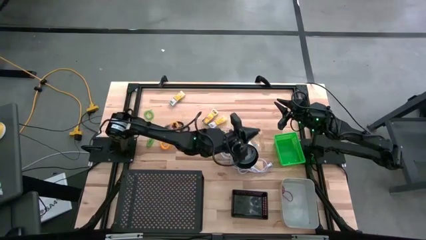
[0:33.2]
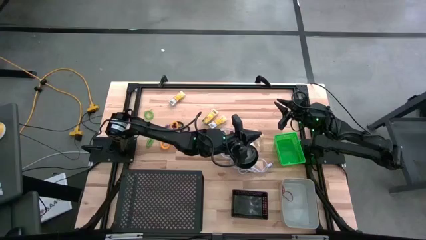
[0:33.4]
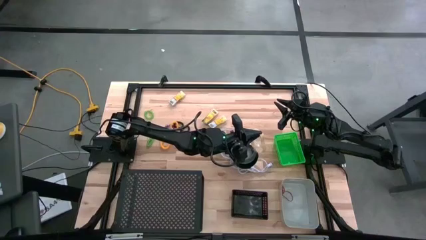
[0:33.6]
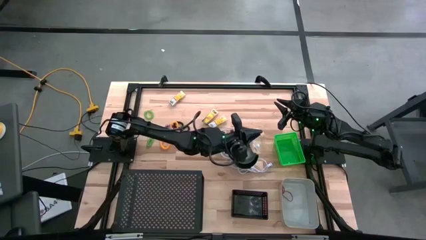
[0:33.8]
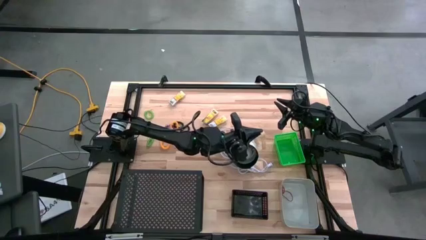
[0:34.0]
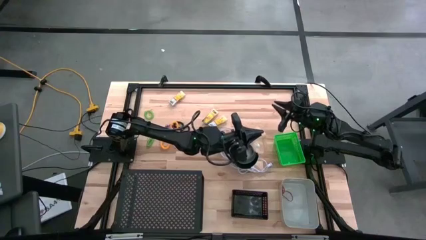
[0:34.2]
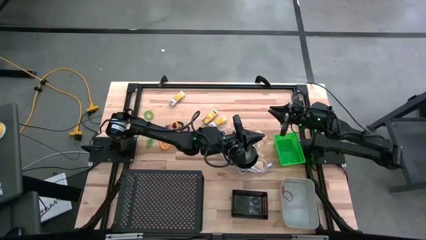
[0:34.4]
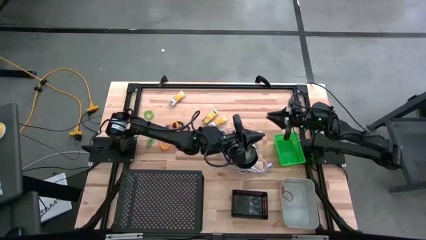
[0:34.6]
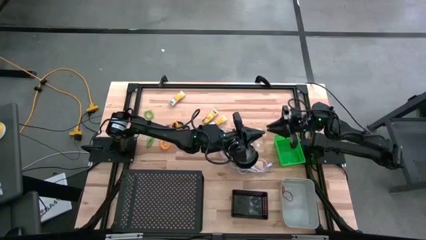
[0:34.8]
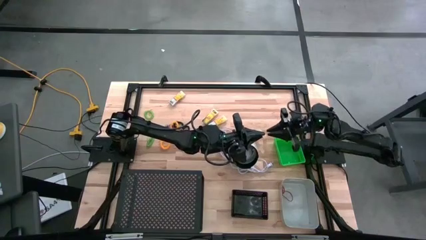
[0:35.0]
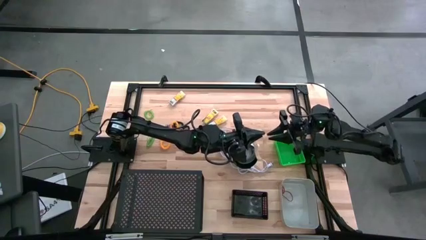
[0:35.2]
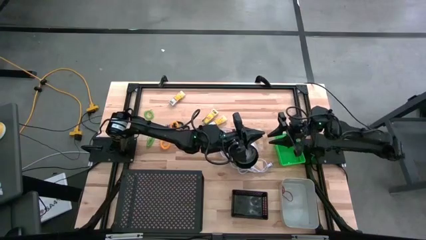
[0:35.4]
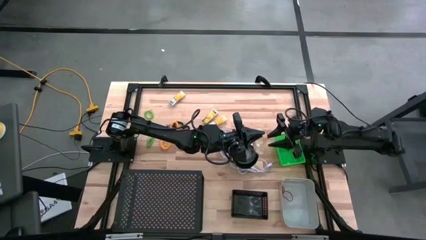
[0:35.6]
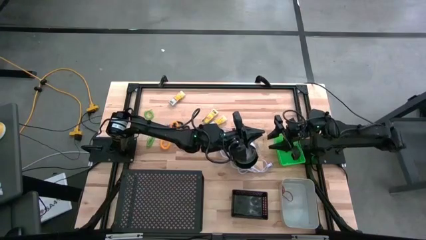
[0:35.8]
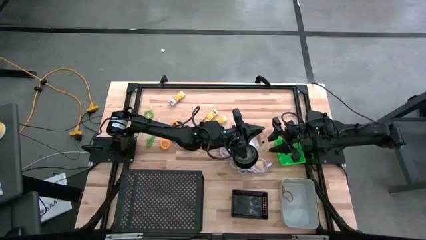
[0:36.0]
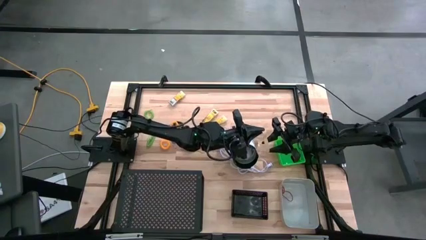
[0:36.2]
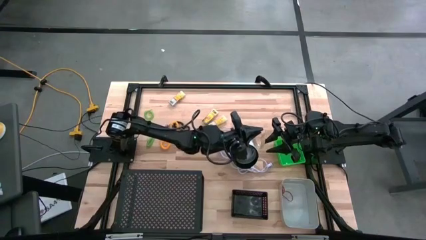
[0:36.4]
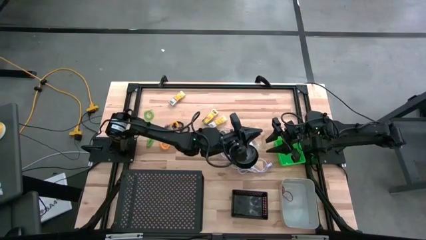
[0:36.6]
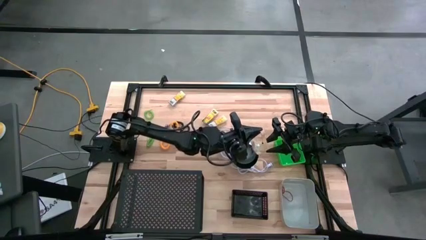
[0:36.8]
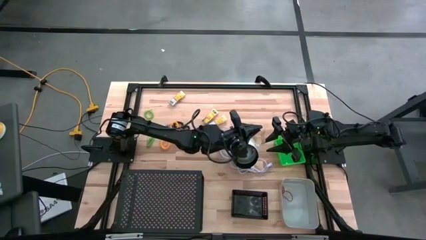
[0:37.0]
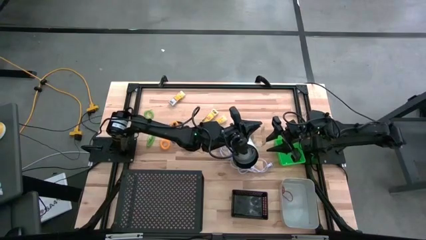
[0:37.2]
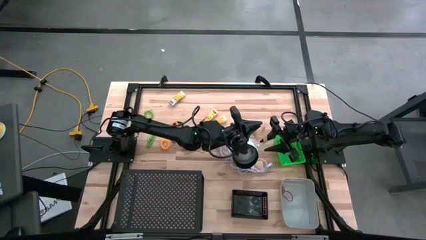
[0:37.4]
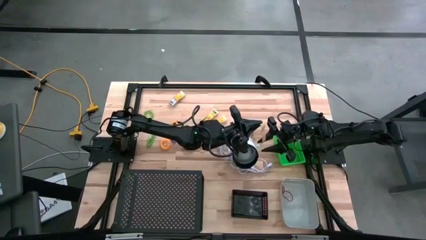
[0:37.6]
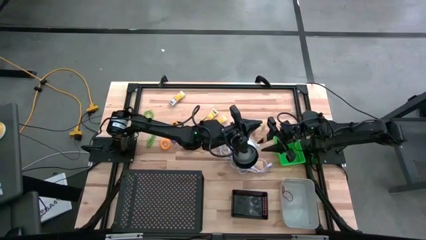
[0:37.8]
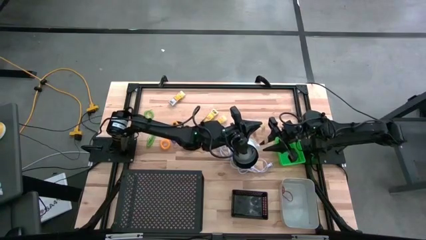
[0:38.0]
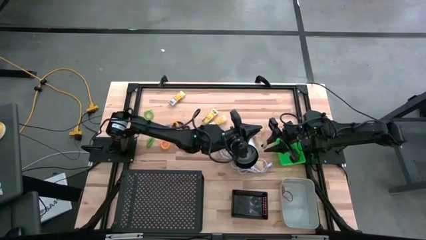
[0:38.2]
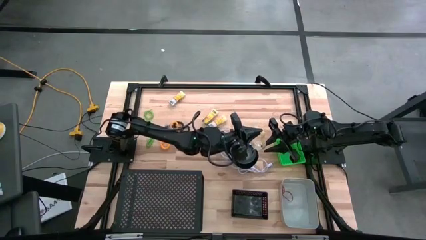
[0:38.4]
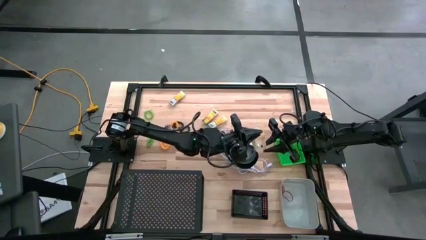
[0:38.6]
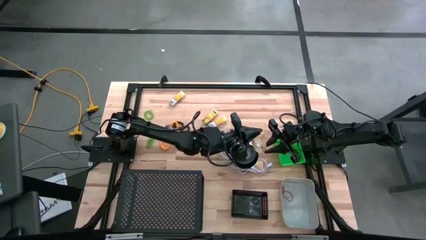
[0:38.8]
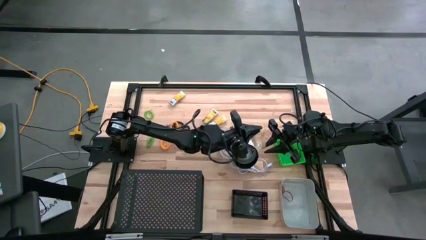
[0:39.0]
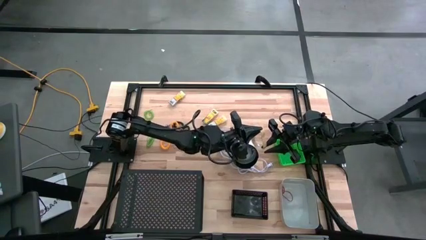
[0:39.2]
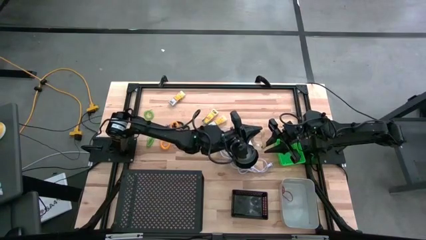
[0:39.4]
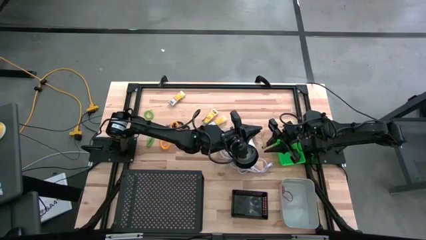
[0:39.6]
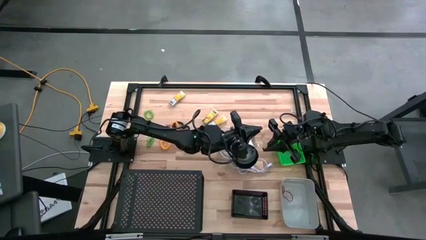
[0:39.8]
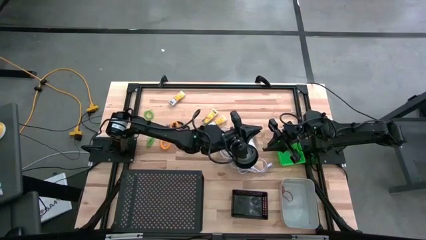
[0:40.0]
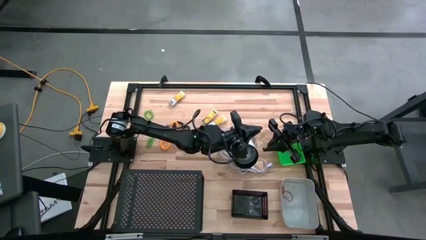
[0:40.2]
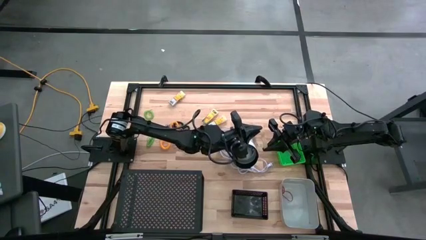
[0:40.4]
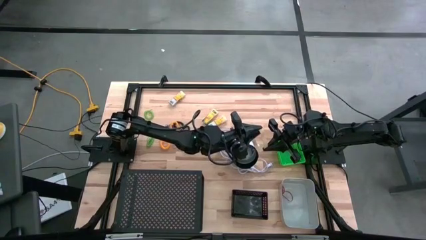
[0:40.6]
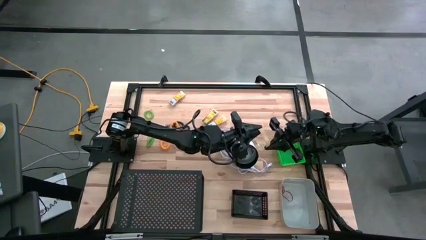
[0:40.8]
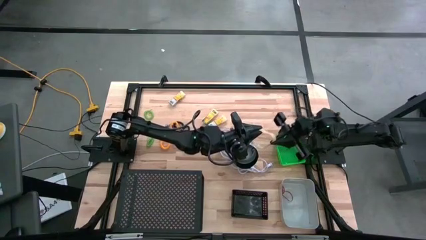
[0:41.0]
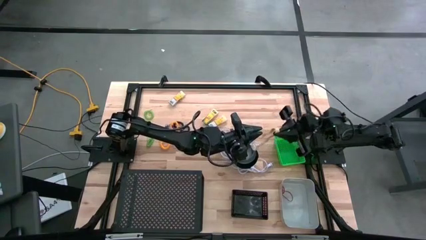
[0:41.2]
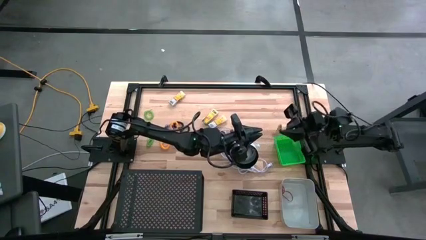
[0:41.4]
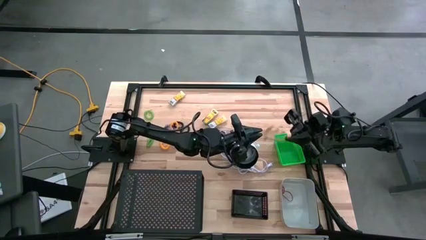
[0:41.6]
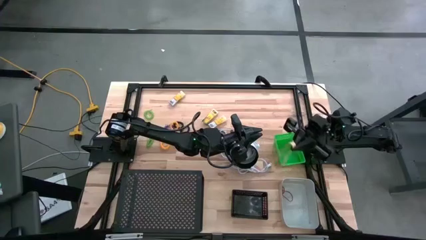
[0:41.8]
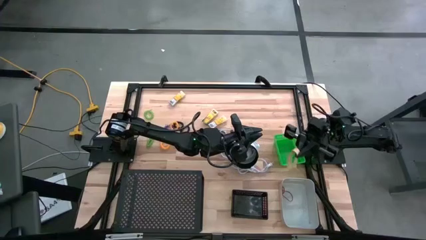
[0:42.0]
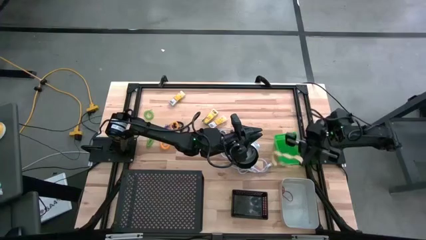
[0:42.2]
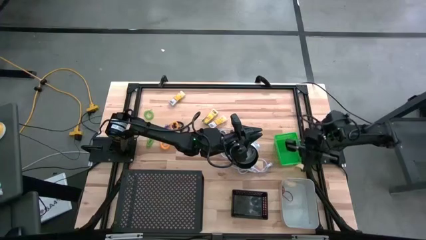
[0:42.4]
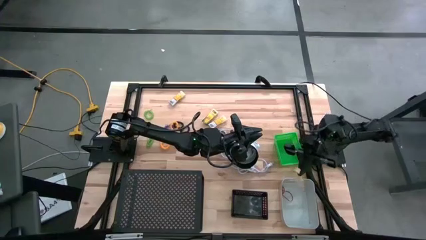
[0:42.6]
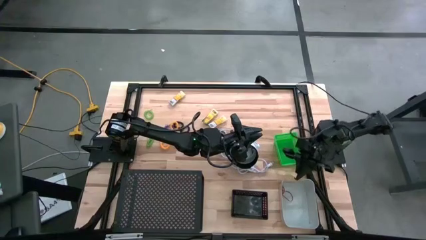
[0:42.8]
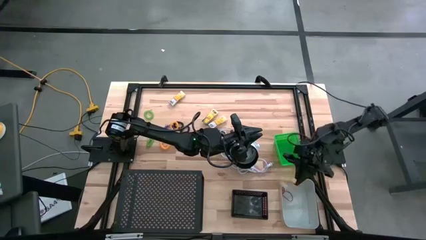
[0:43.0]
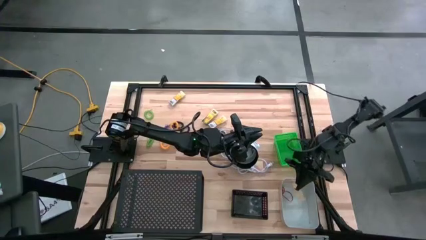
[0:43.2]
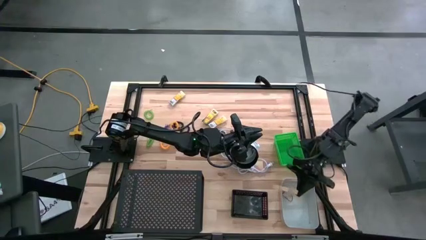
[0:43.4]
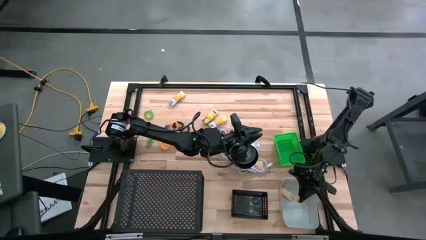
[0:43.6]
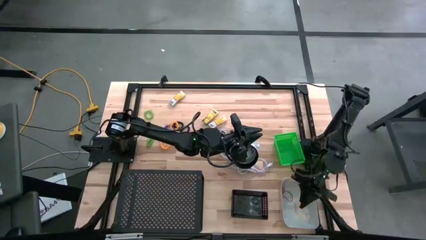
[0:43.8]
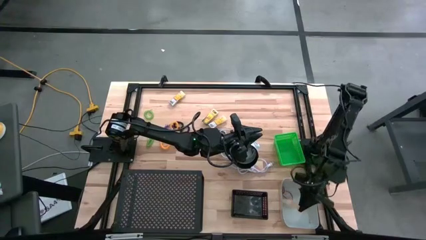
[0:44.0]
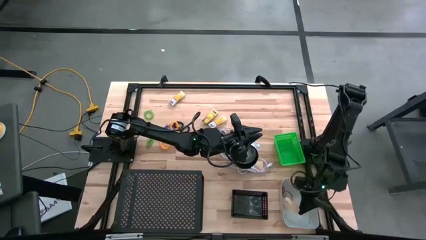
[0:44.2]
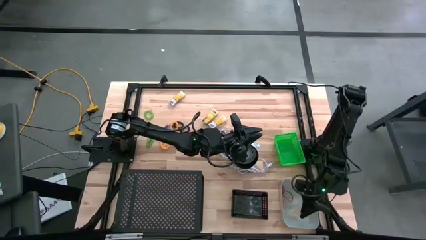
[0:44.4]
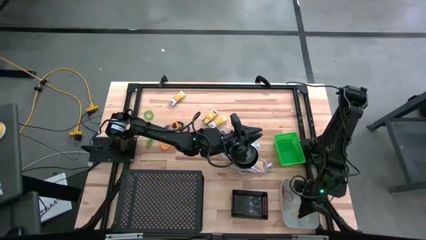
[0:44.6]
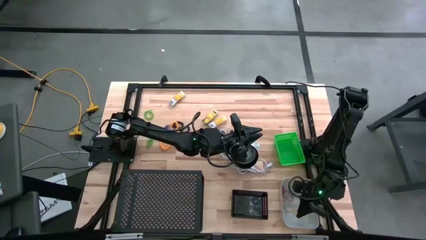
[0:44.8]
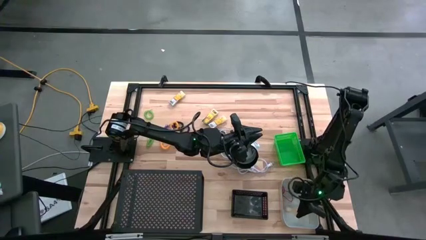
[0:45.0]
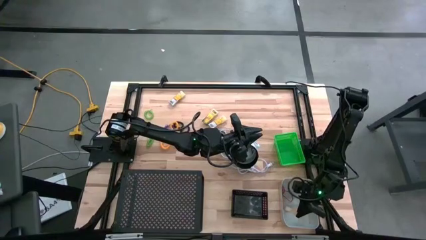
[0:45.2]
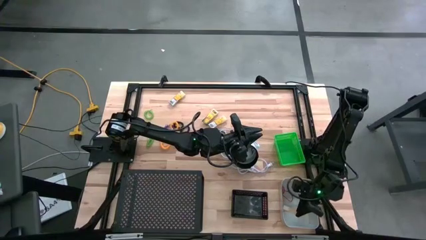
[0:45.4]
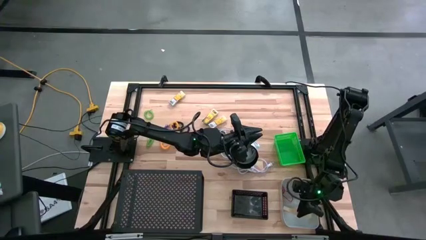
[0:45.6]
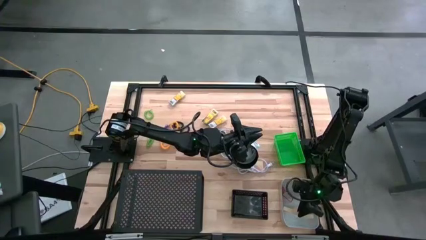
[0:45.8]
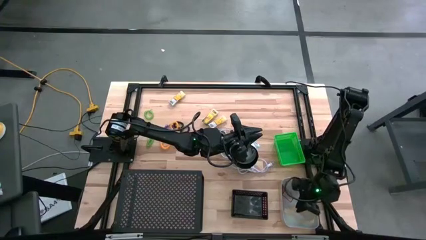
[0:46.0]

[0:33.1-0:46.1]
Task: Pick & Place Office Desk Supplies
Put the light brown rubberband into the gray bin

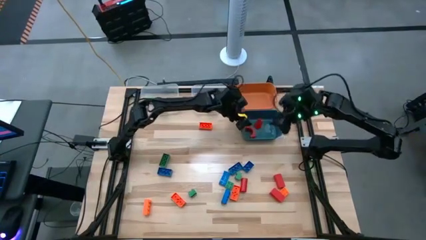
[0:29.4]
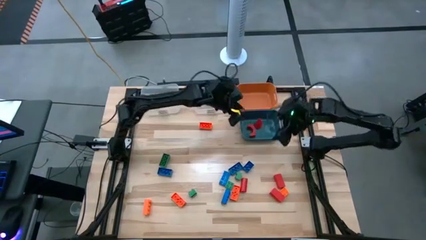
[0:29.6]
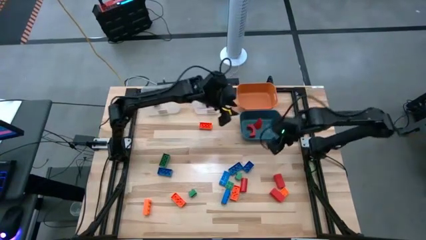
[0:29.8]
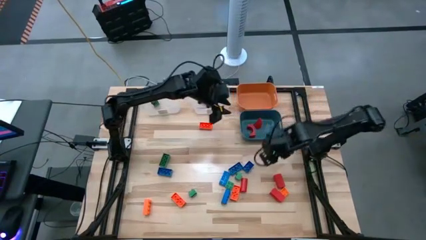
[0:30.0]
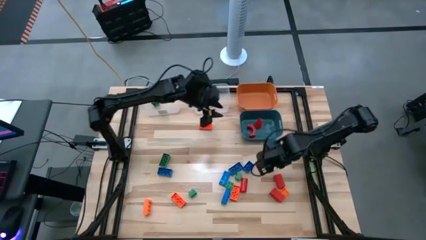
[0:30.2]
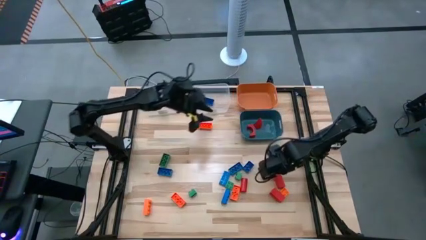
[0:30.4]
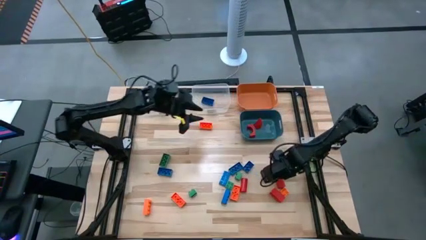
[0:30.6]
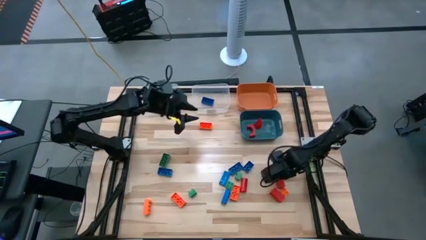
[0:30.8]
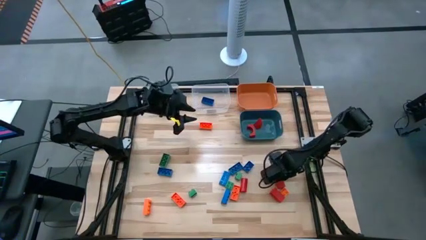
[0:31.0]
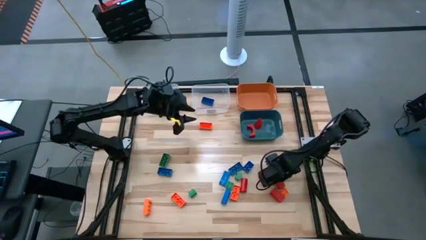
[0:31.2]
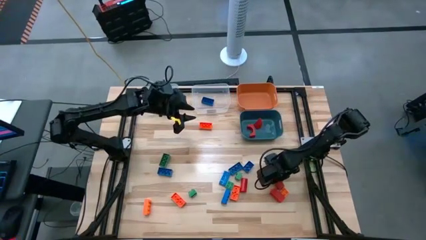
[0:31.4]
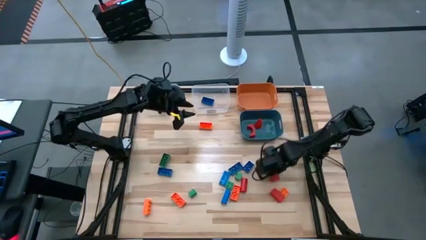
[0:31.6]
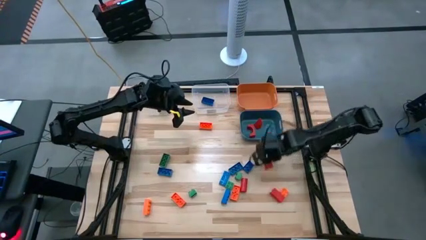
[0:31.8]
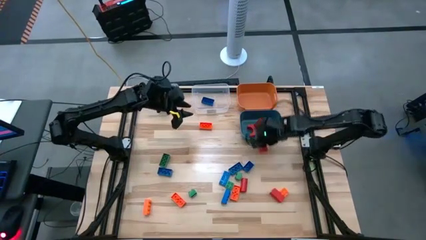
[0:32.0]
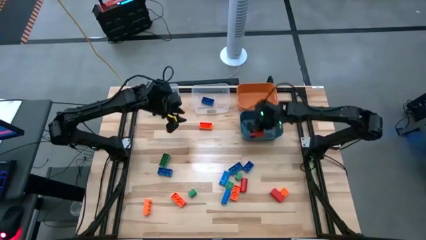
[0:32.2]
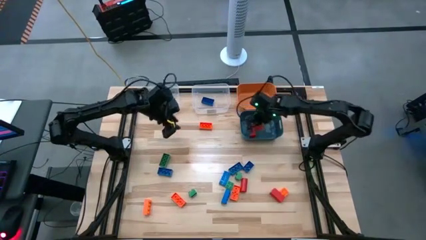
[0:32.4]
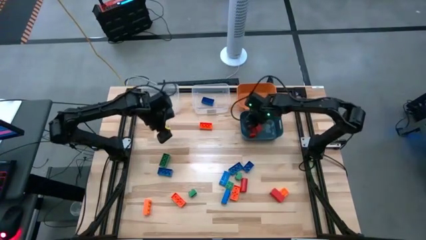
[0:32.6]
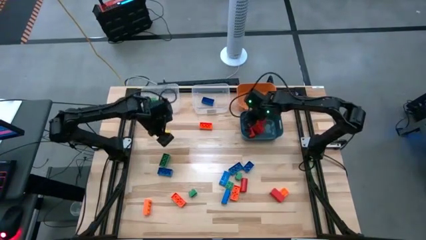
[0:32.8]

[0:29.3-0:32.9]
Task: Sort blocks
Put the red block into the blue bin
